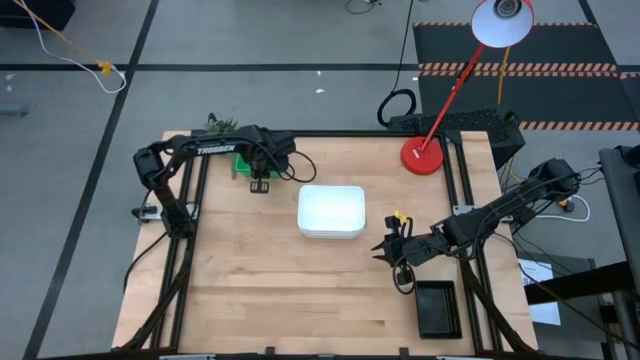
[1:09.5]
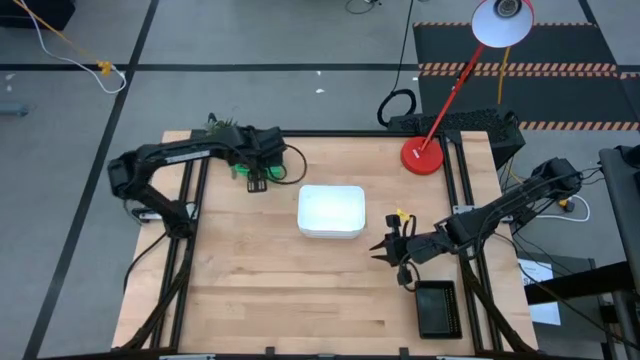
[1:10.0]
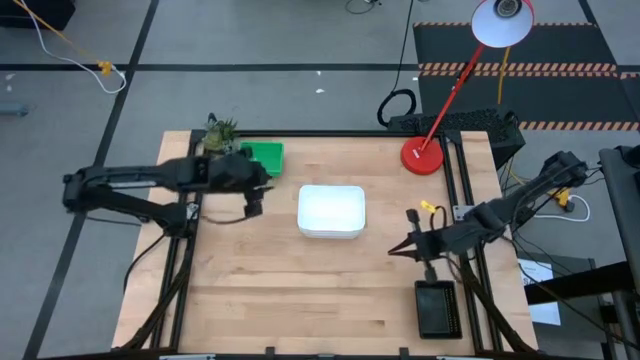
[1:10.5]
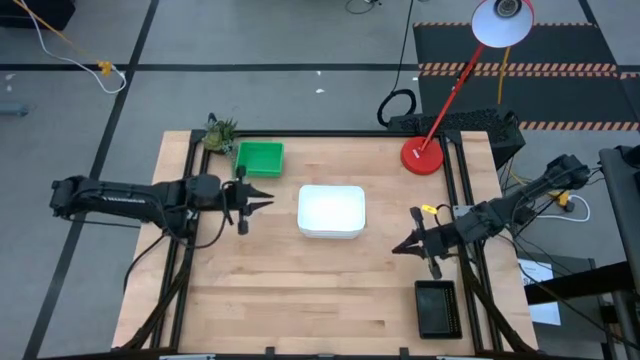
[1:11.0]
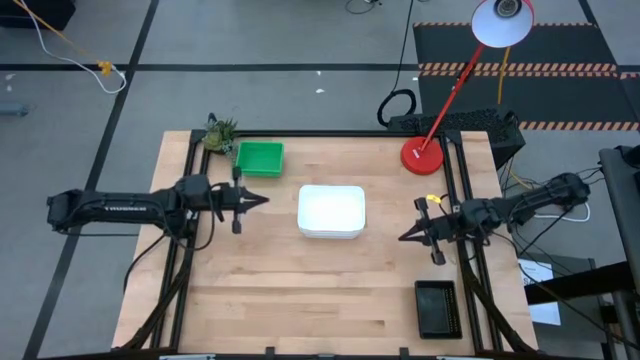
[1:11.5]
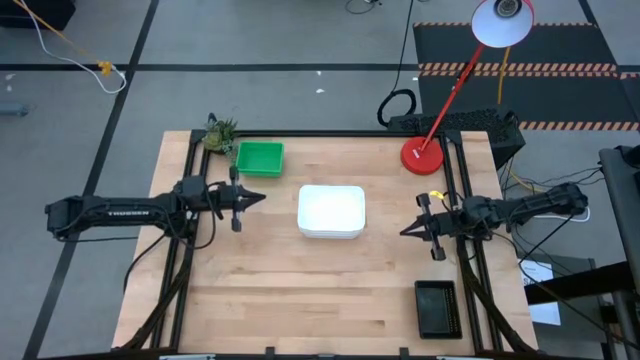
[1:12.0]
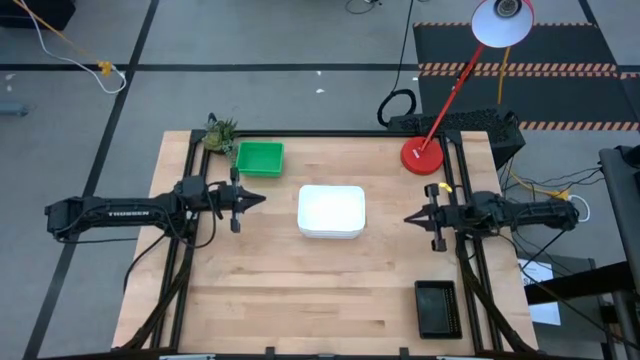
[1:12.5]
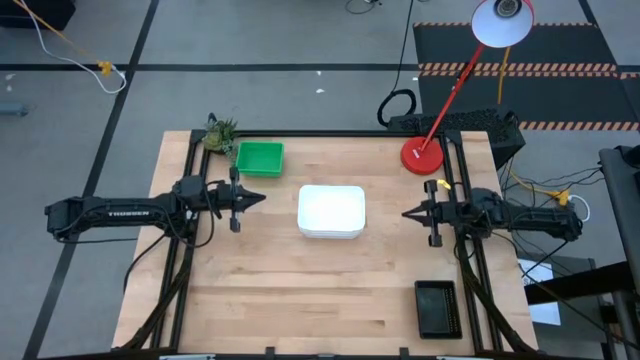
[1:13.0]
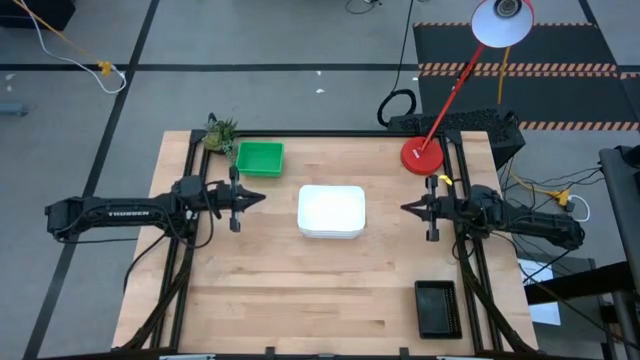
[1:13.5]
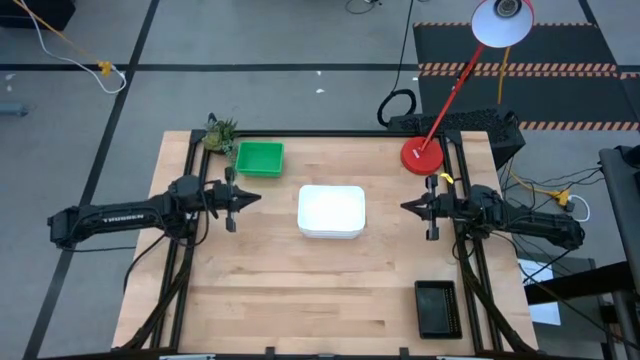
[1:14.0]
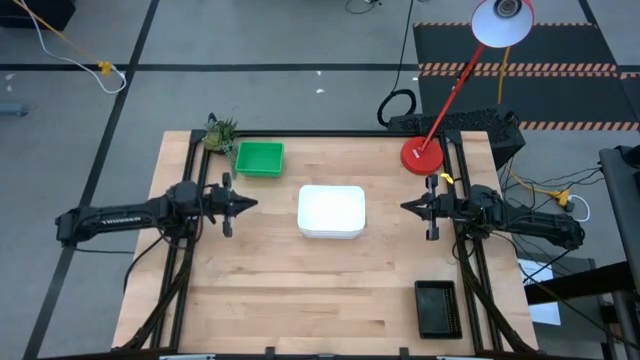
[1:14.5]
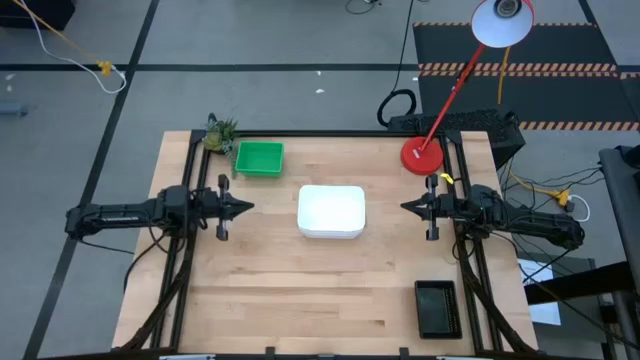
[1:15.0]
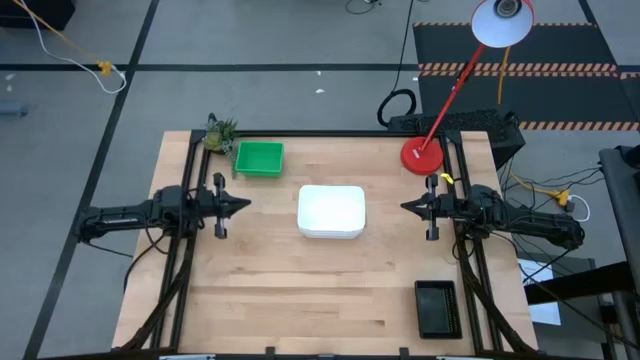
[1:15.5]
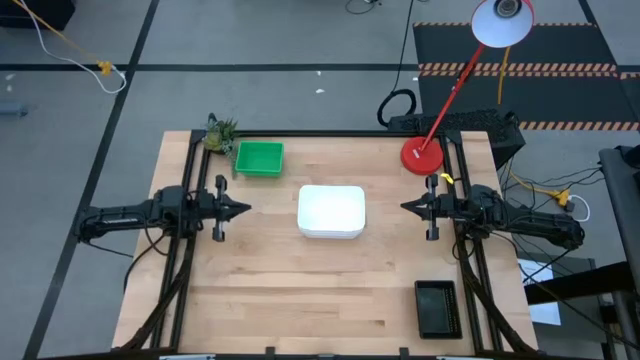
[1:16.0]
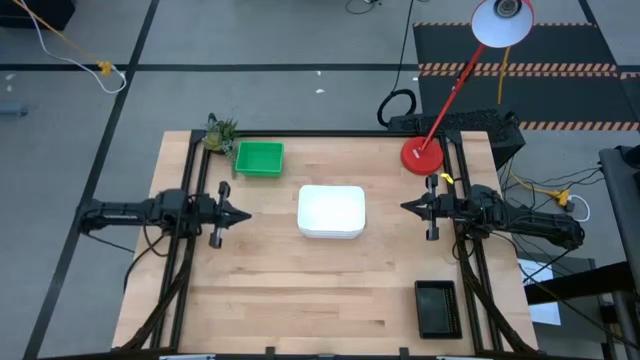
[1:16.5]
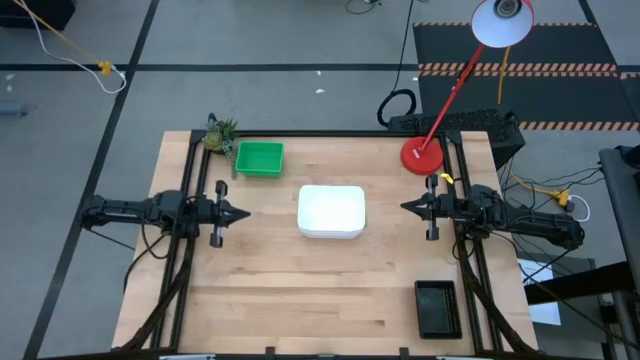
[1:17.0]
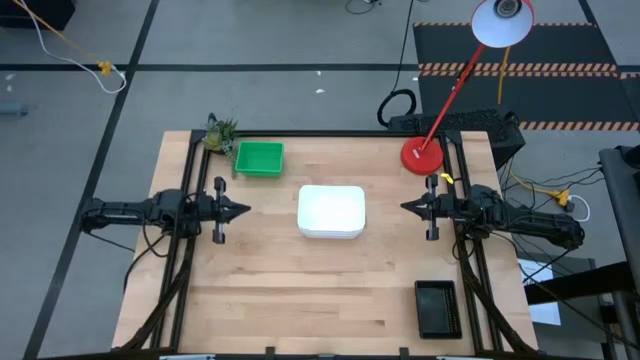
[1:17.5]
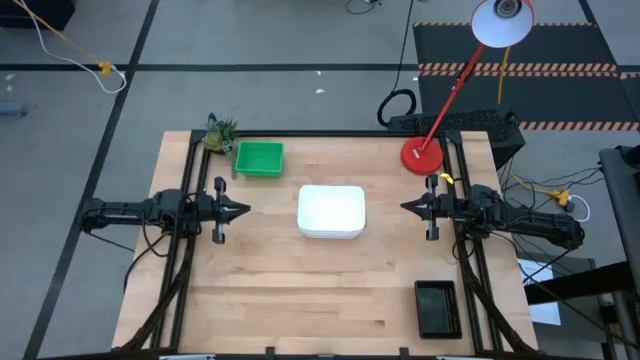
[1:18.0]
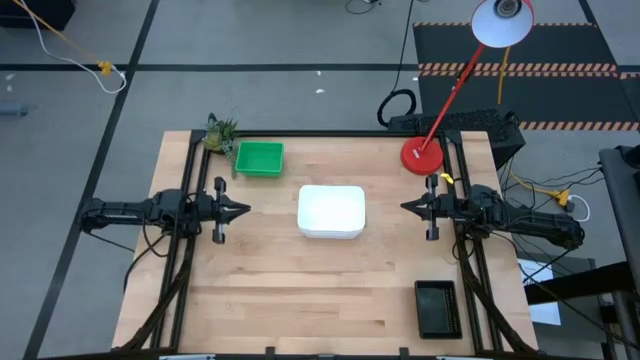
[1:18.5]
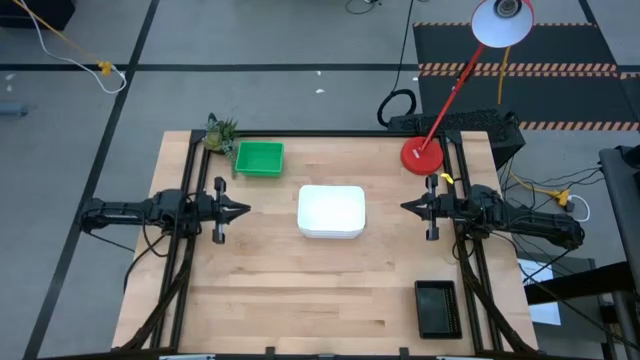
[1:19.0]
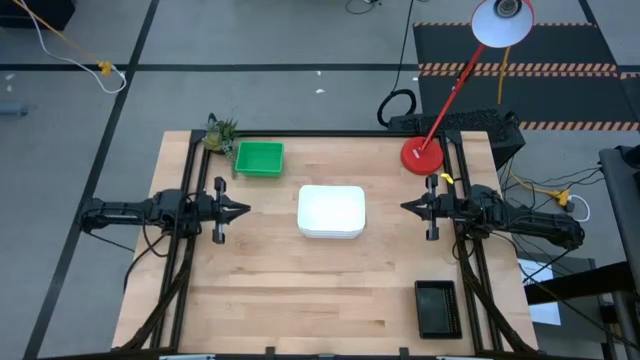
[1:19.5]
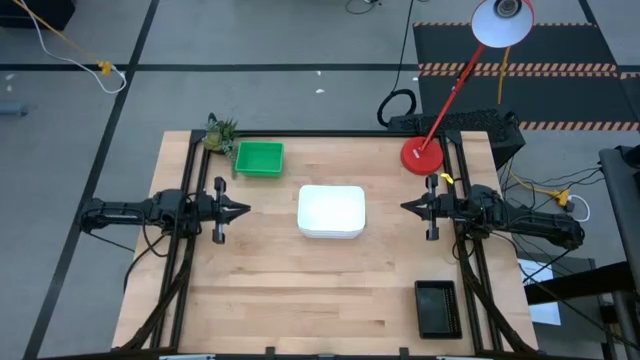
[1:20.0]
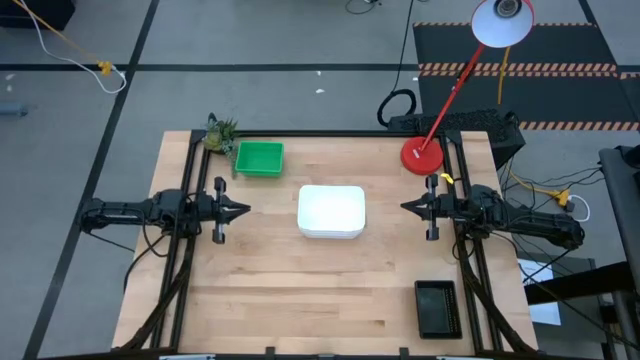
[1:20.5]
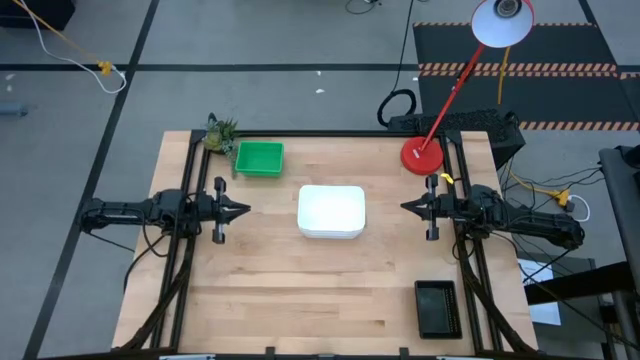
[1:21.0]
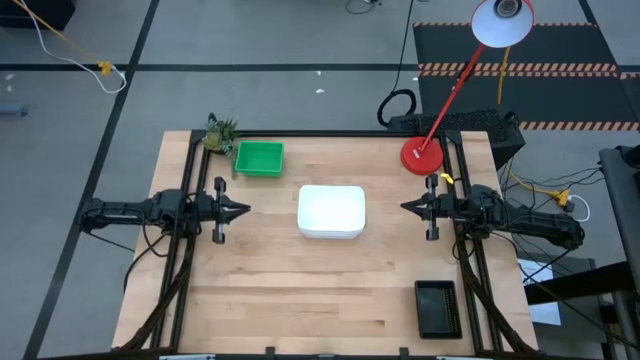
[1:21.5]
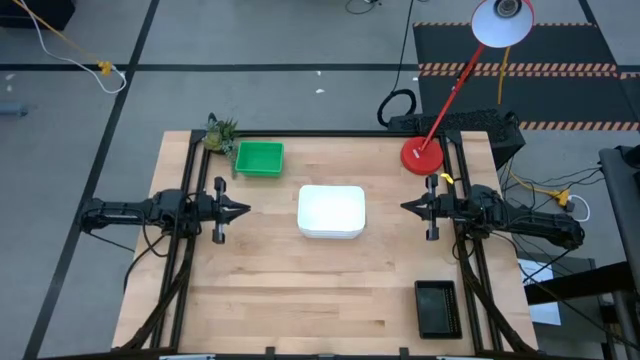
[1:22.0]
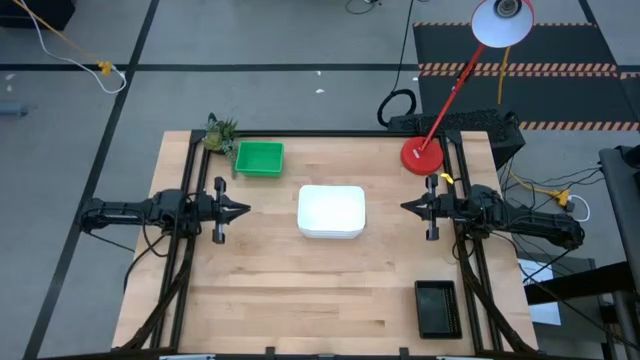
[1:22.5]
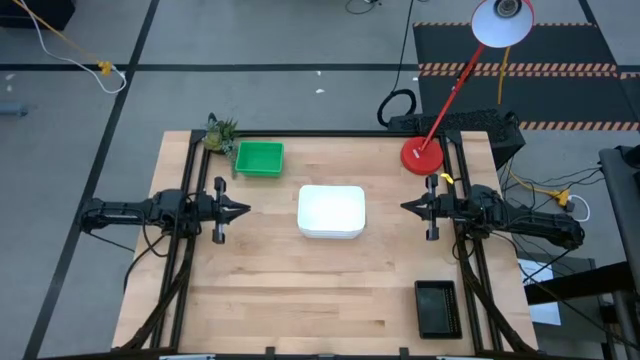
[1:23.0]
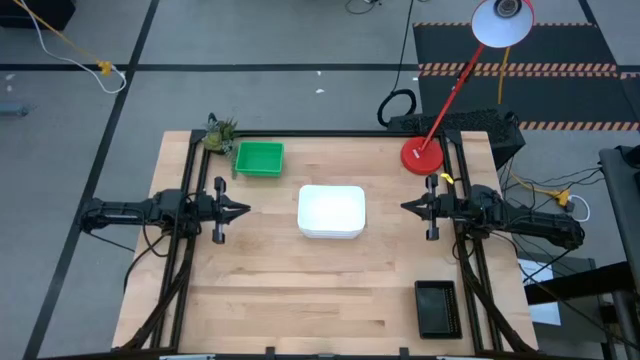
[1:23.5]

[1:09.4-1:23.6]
Return to Home Position
